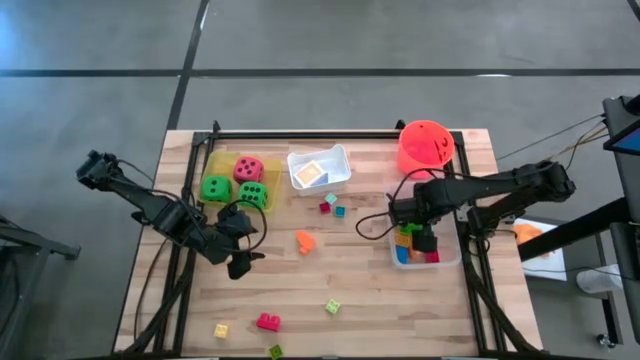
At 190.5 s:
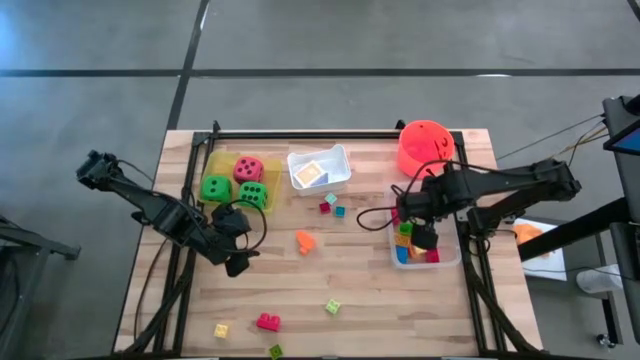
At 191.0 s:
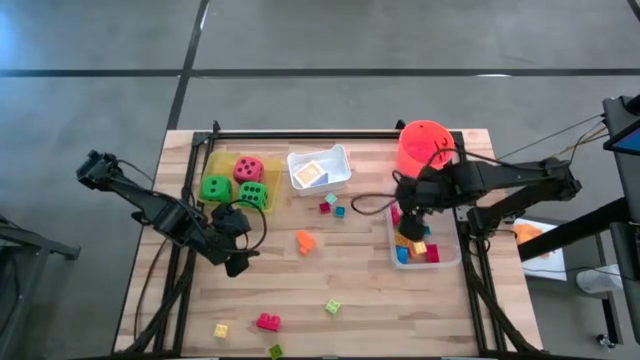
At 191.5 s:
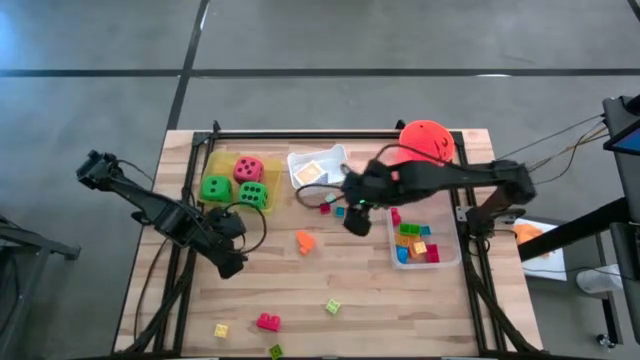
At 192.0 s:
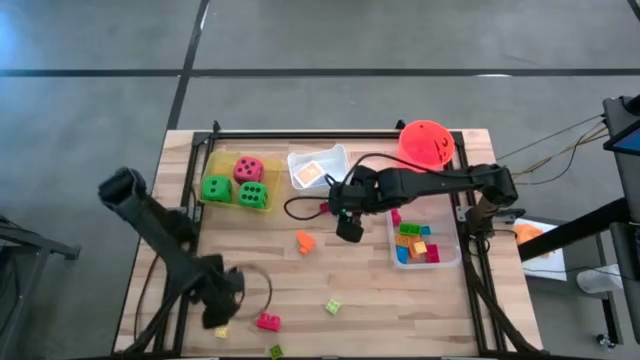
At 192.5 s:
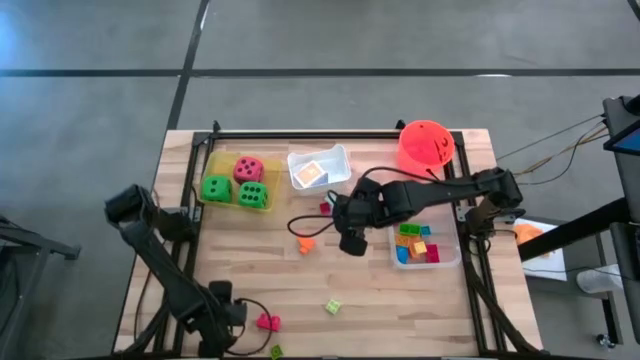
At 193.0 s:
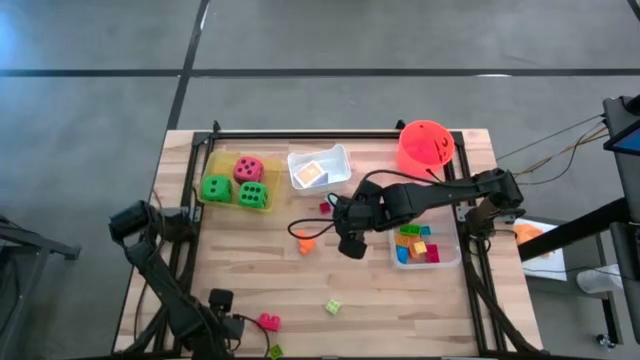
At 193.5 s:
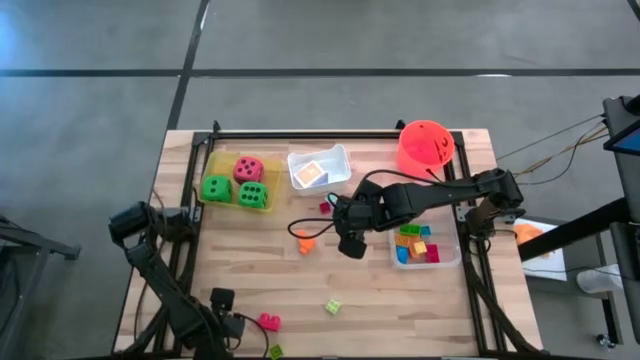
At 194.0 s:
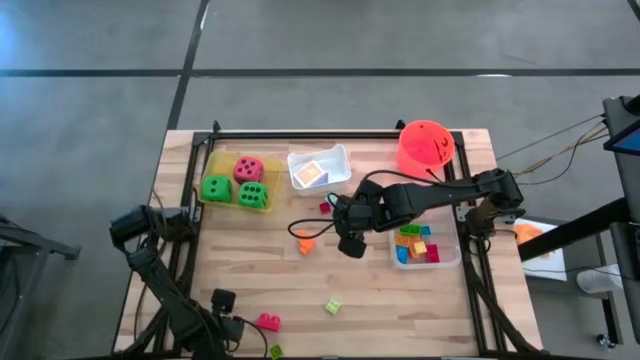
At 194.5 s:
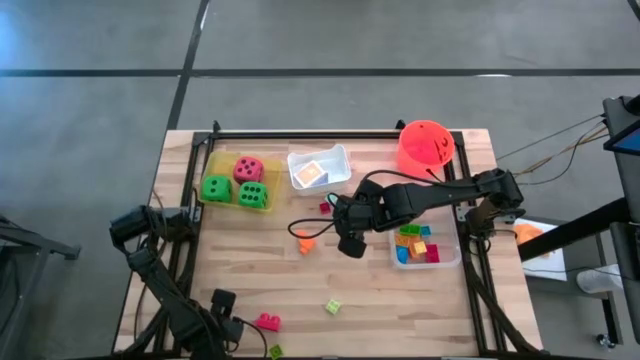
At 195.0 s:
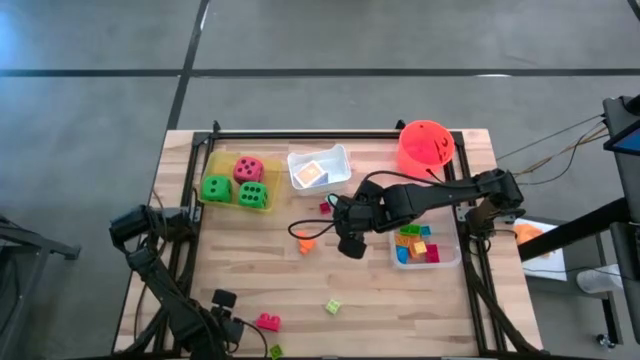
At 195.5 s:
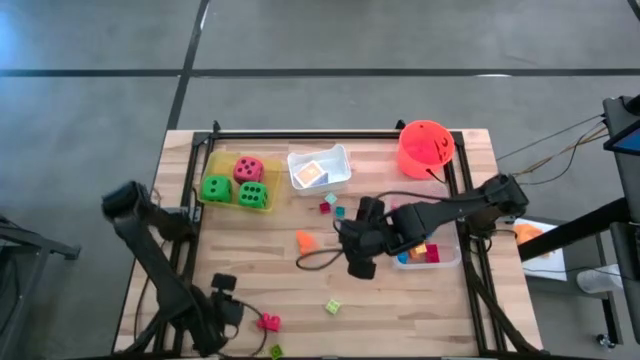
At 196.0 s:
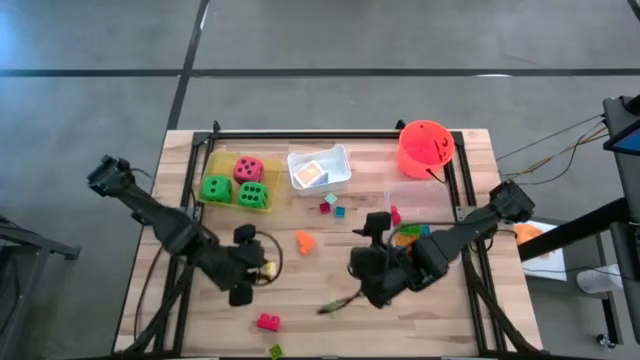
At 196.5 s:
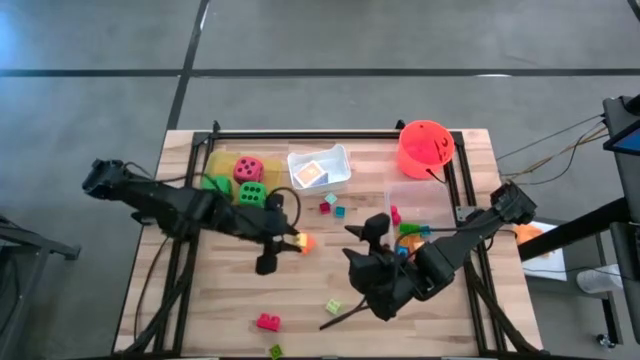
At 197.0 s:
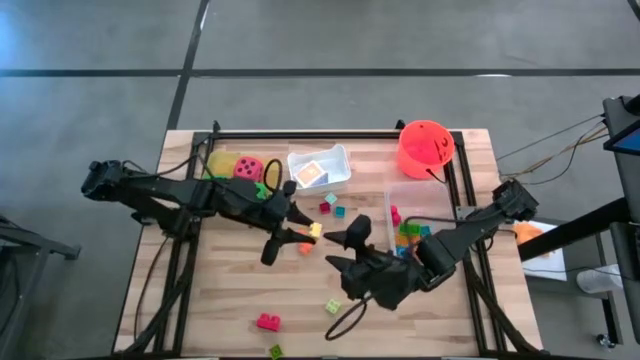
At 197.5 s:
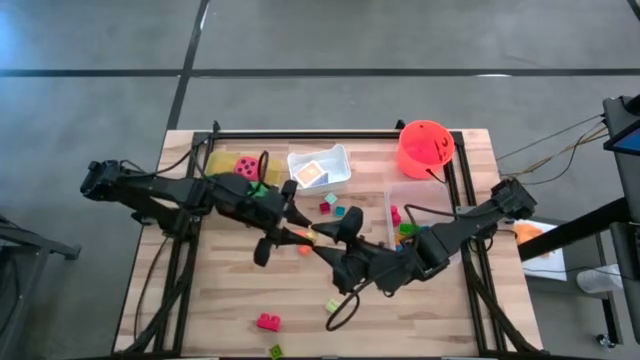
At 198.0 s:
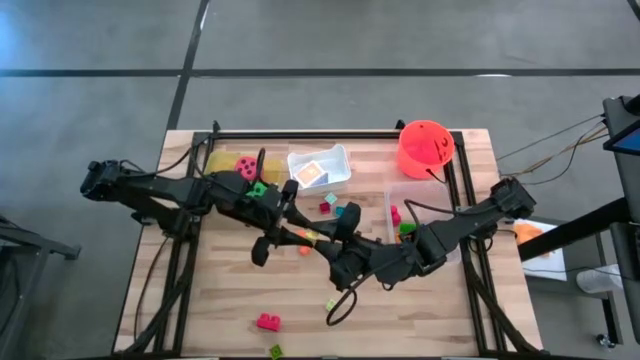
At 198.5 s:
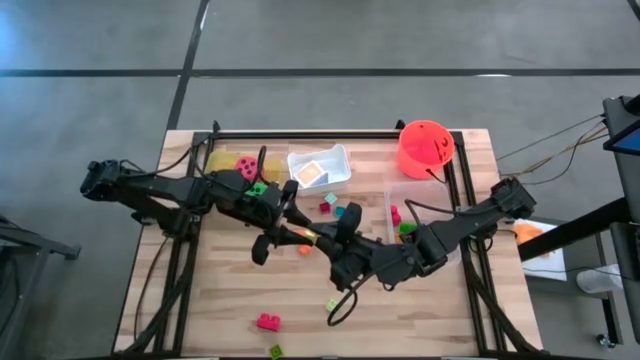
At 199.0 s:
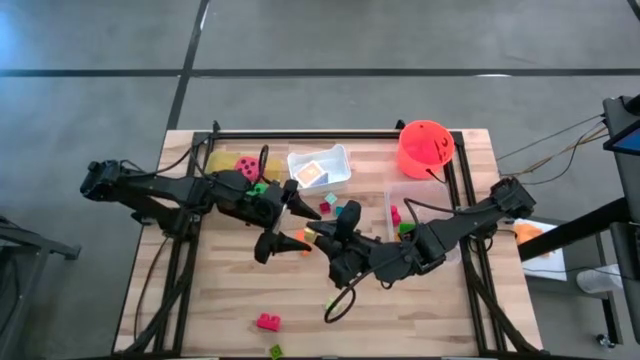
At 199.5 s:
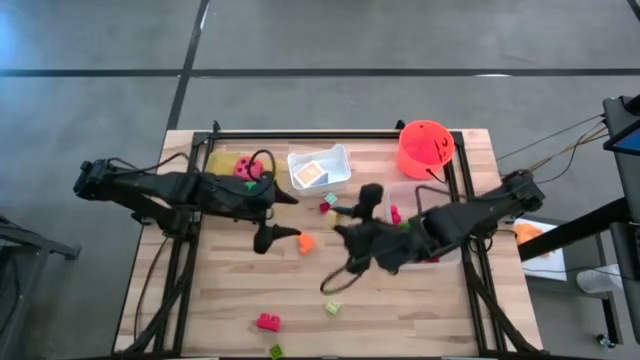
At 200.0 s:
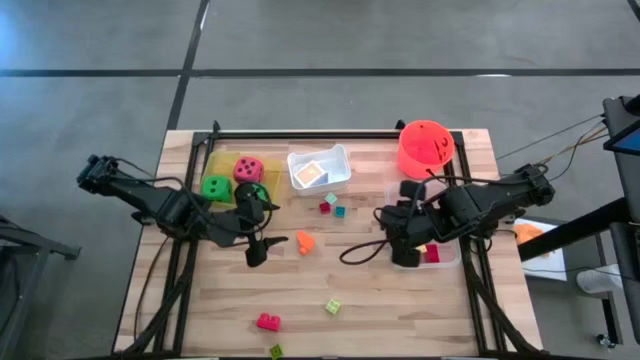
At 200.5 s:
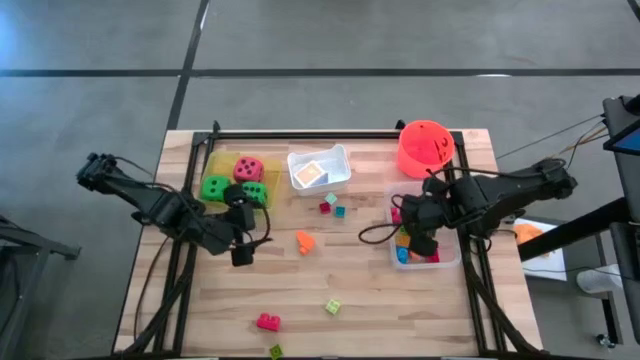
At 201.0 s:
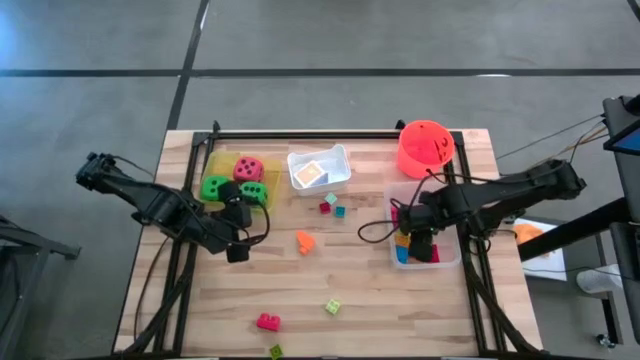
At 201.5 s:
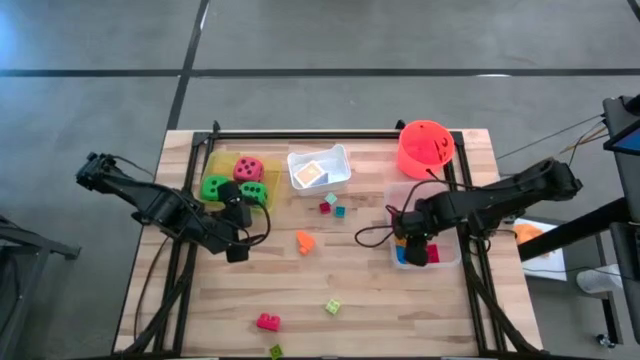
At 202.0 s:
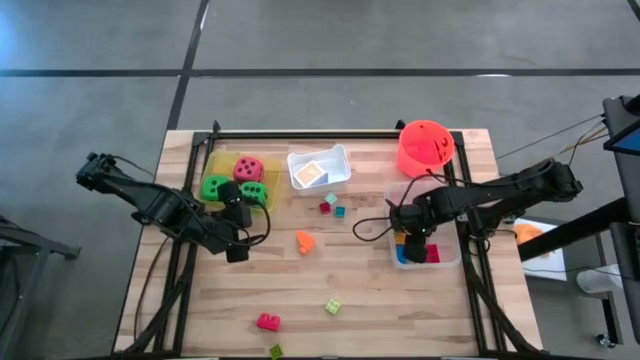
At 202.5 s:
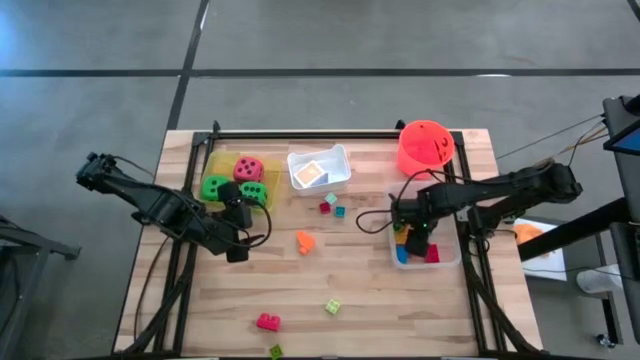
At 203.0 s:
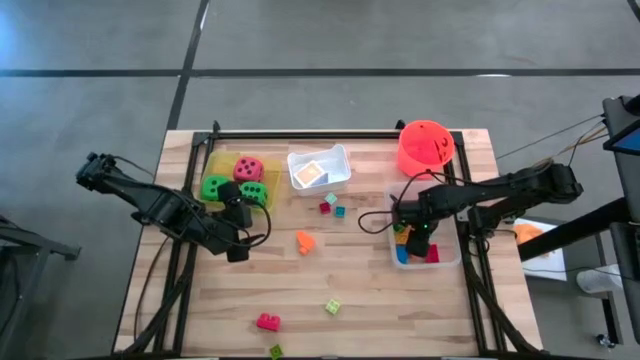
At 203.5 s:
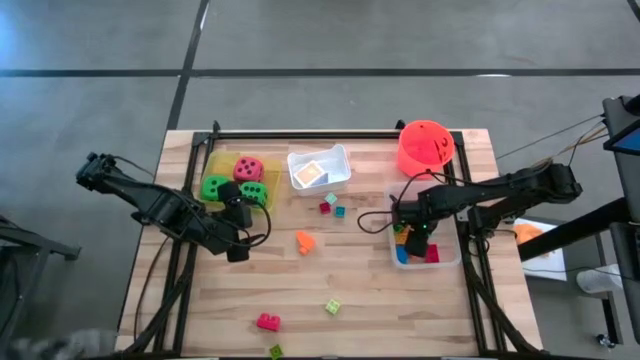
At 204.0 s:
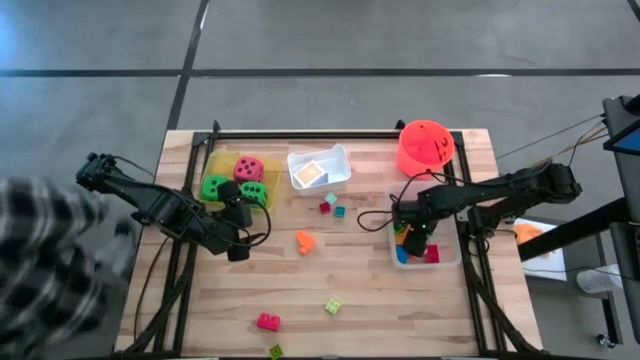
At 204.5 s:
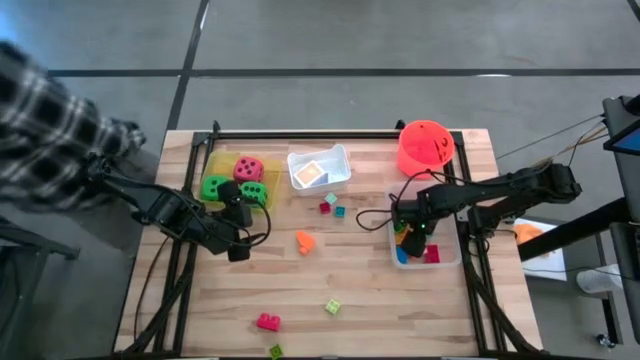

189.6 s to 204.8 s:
Task: Pick & Place Toys
Put the yellow game piece into the transparent bin

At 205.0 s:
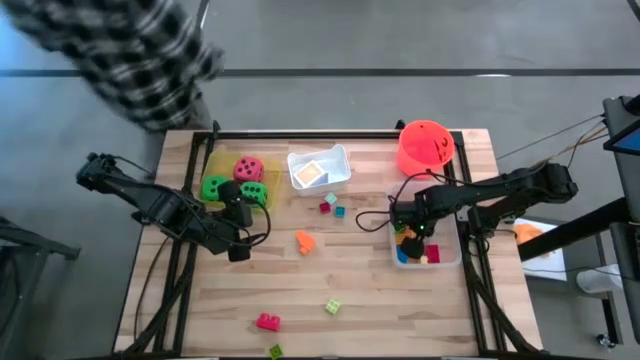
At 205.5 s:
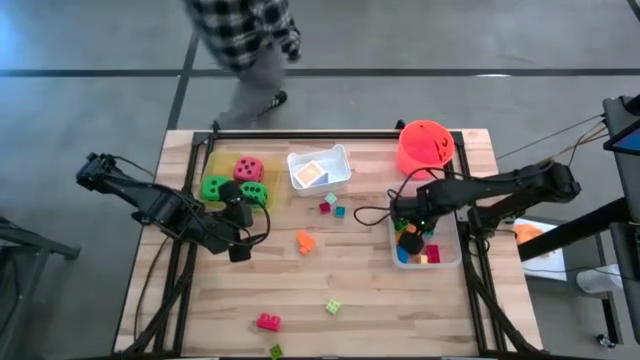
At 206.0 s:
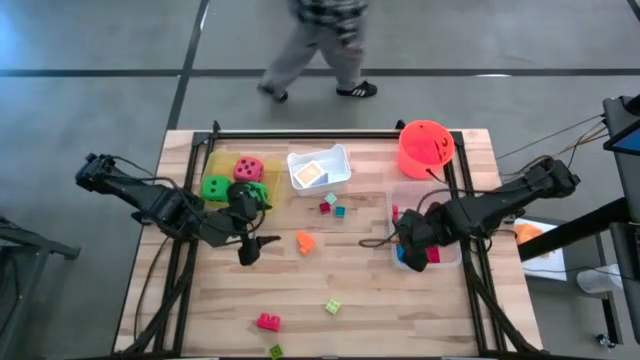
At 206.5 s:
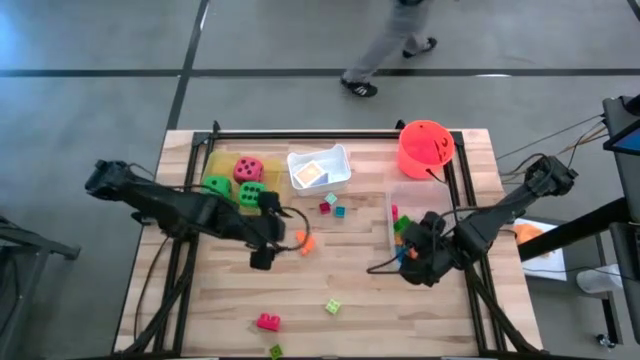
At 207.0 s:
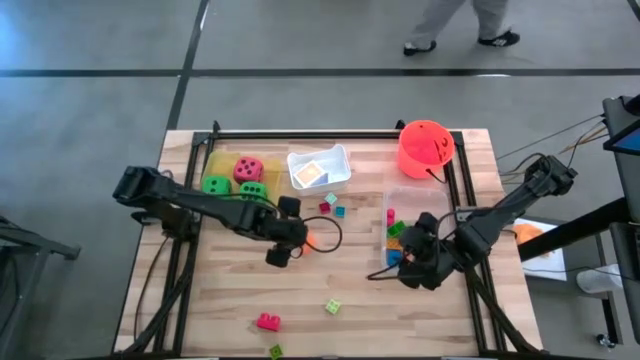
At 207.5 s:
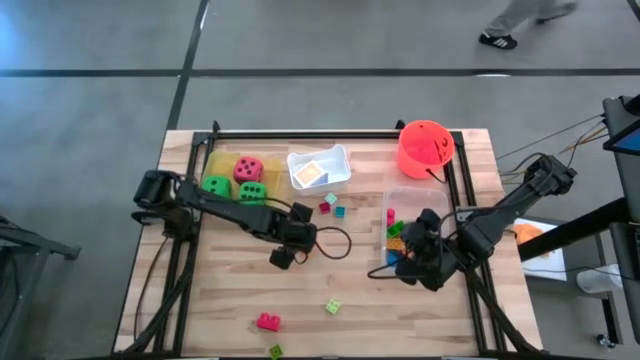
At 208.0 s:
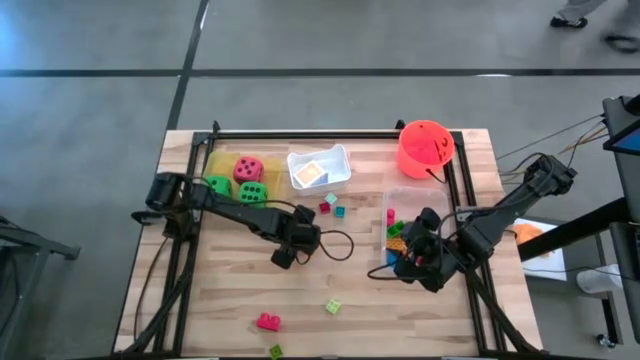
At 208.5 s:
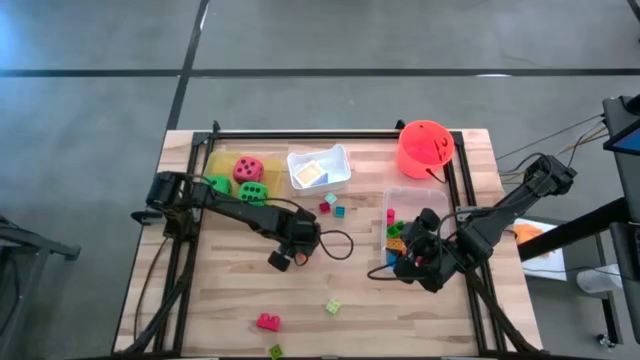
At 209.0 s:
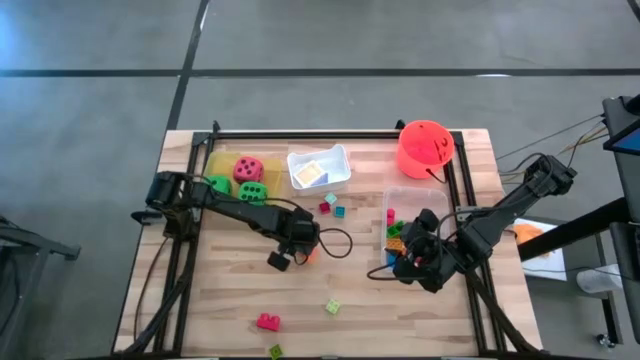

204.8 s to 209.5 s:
Put the orange game piece into the transparent bin

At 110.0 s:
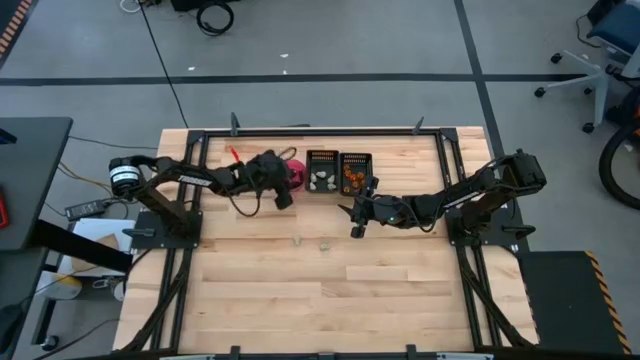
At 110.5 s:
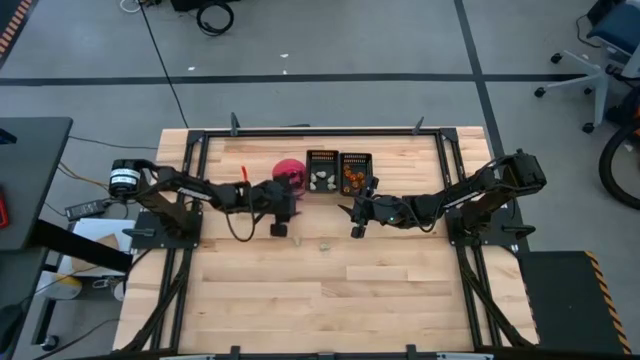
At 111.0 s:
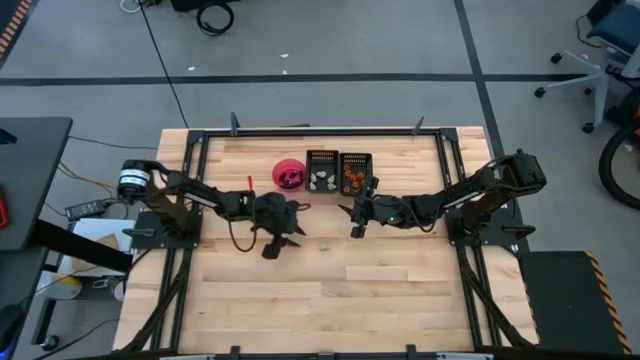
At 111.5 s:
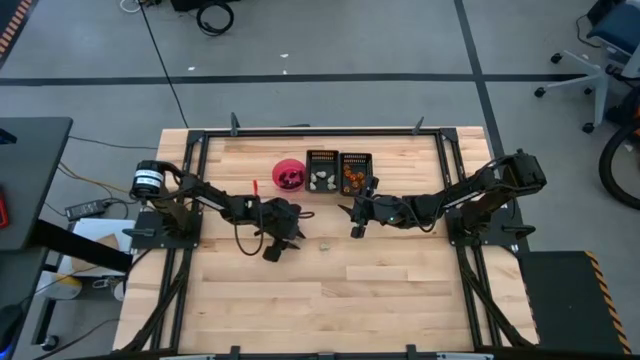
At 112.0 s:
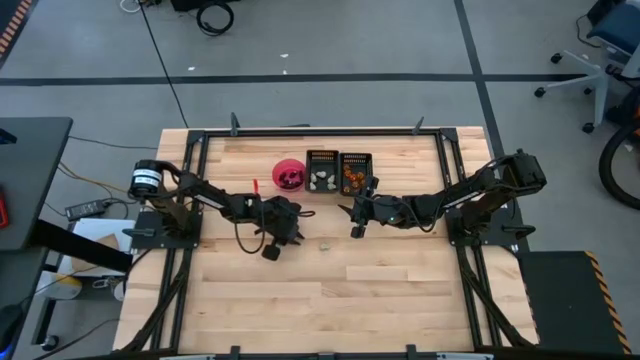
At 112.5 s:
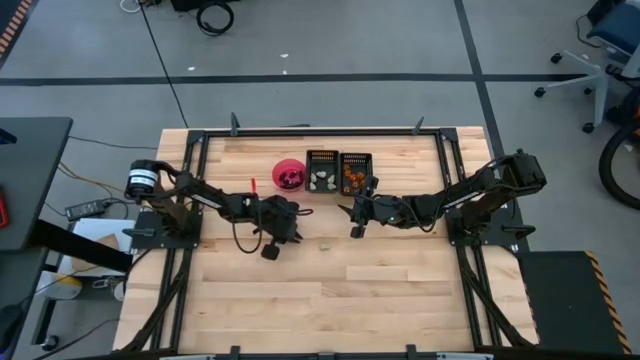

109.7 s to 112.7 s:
Task: Sort Halloween decoration
Put the white skull toy into the left black bin
